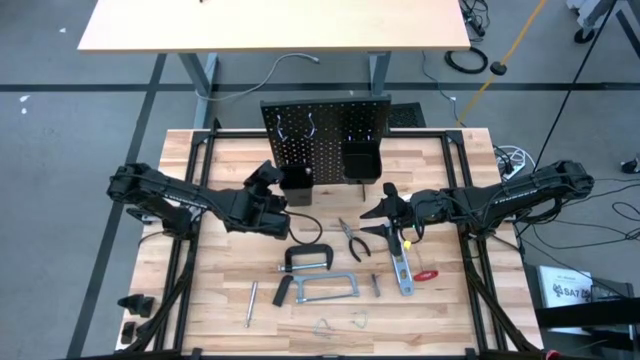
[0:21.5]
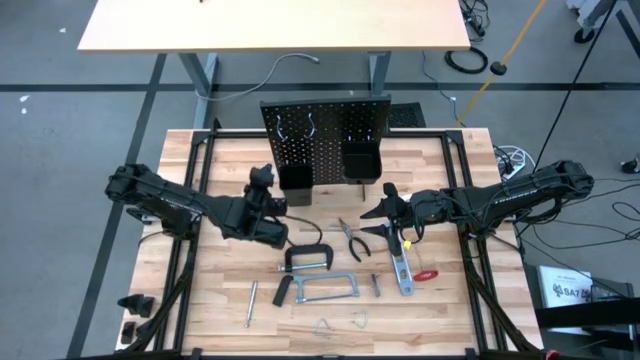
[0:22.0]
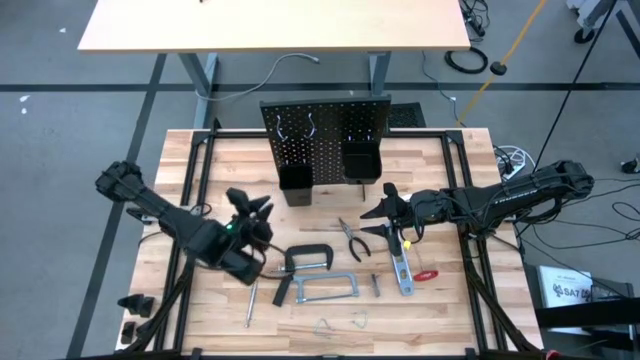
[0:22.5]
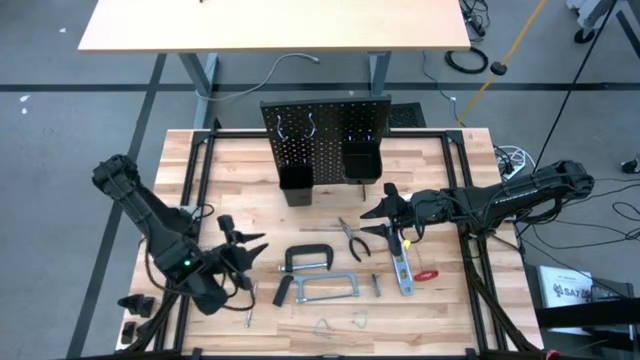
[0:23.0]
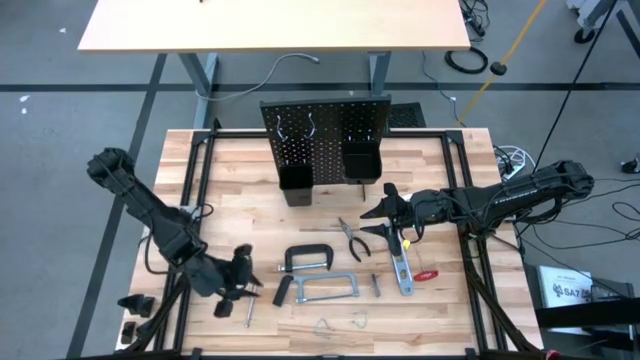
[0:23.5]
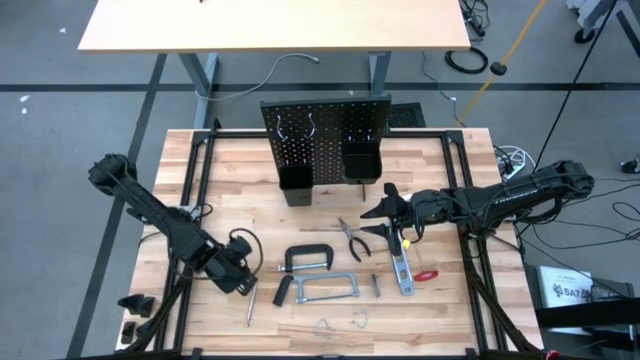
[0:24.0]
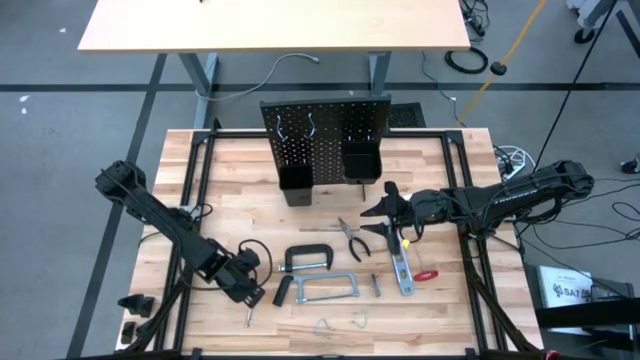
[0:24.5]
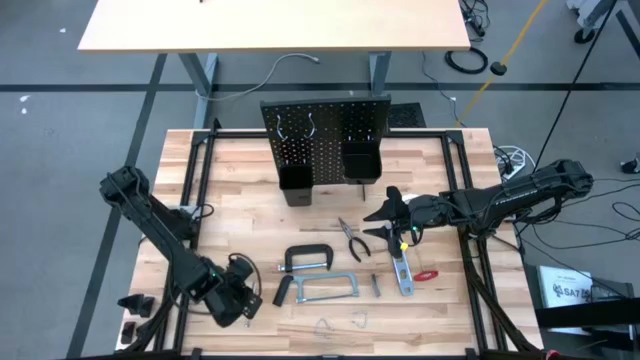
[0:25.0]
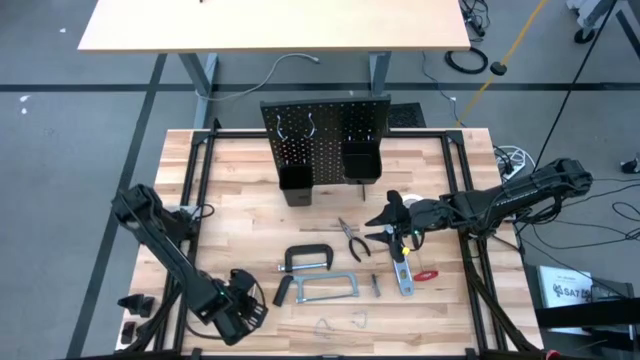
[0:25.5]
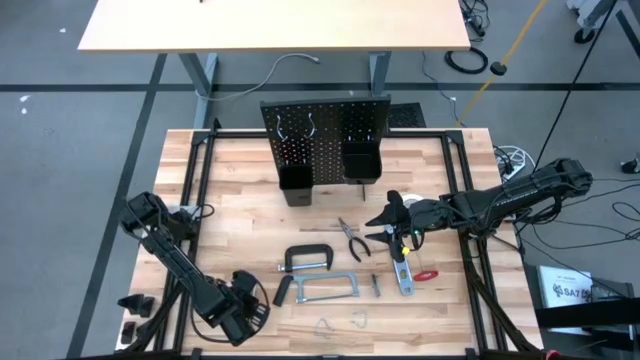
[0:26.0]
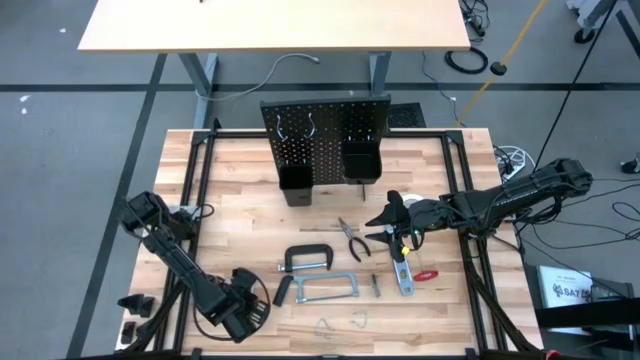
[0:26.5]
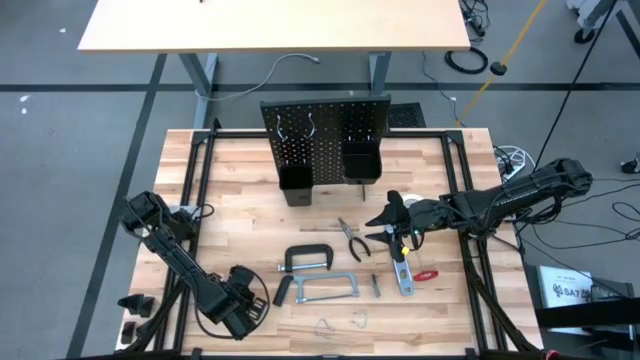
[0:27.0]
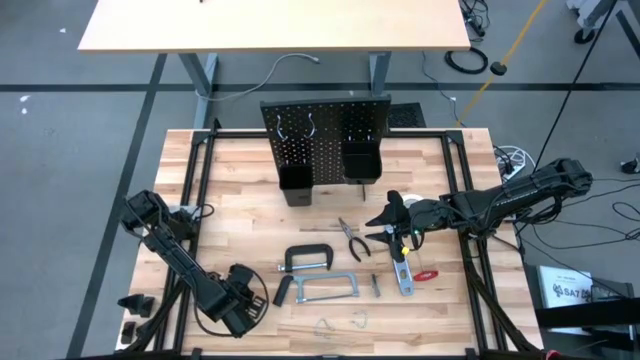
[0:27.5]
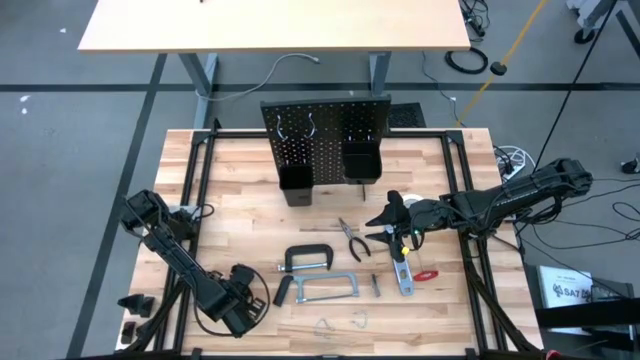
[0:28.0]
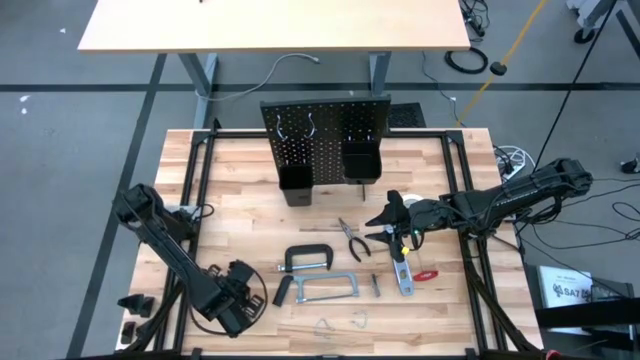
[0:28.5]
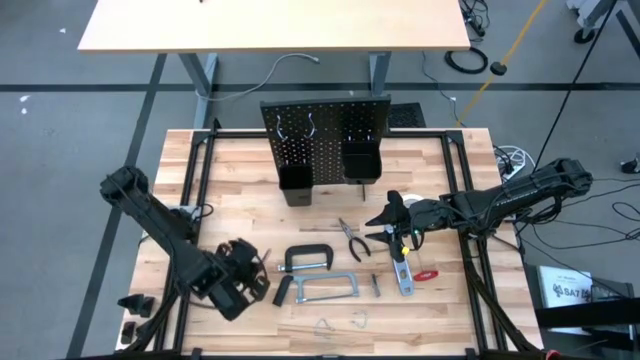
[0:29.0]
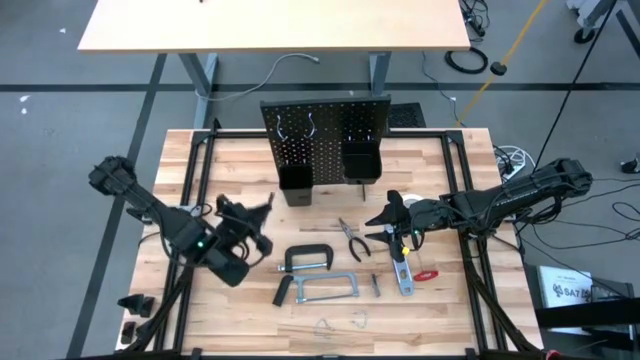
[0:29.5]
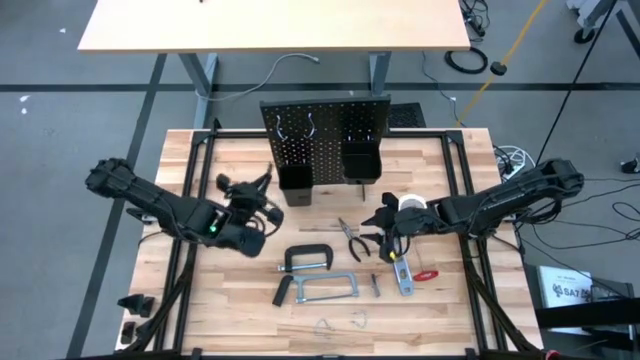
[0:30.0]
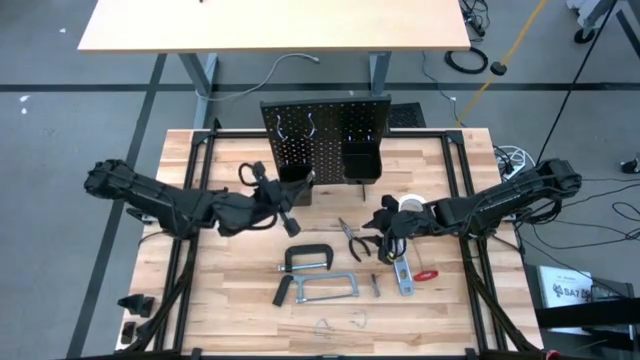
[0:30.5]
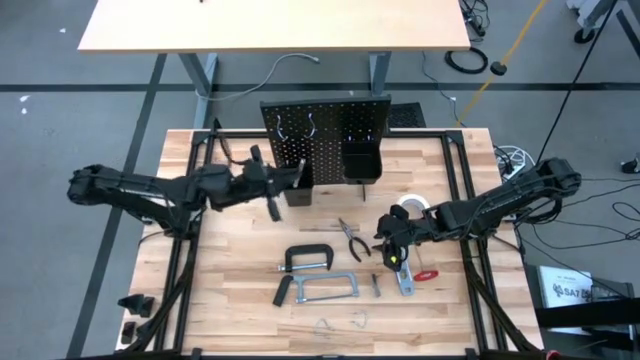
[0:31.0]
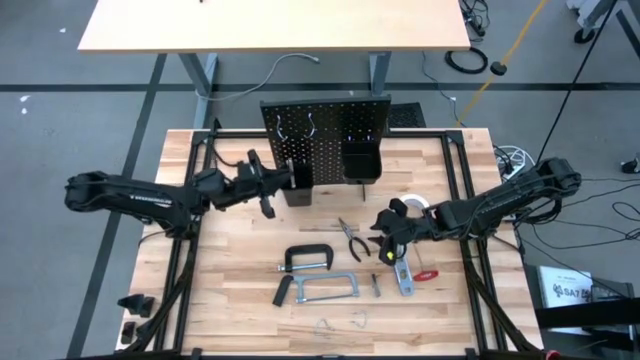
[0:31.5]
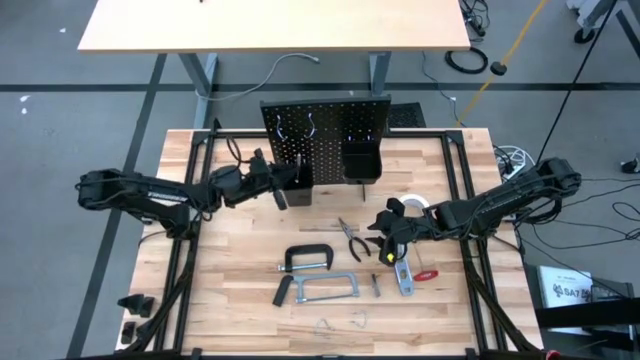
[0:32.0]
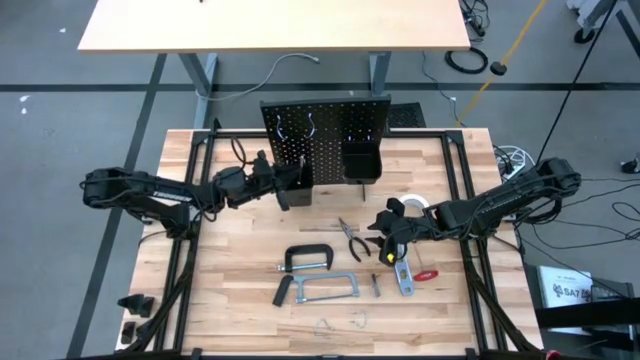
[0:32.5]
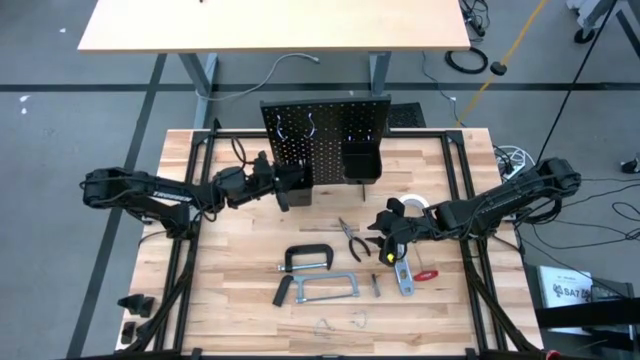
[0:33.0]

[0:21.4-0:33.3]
Task: Hang tools onto peg board
Put the silver pen into the bottom black bin on the peg board

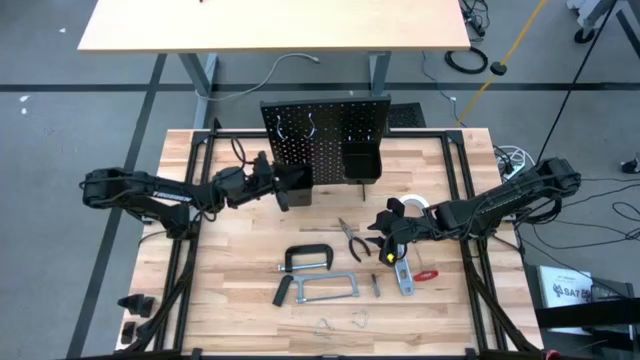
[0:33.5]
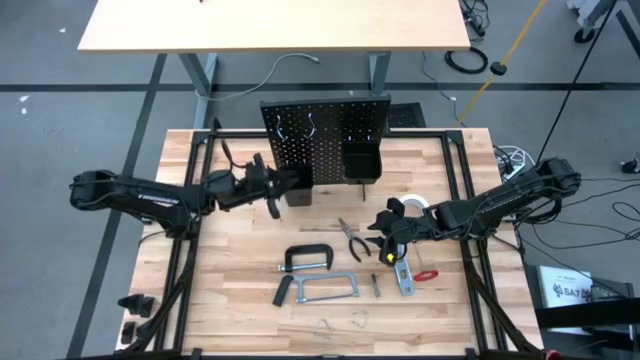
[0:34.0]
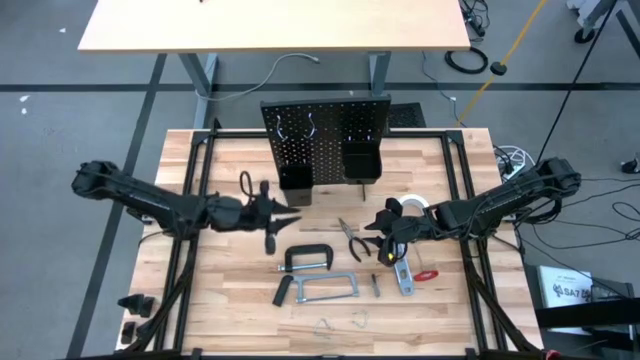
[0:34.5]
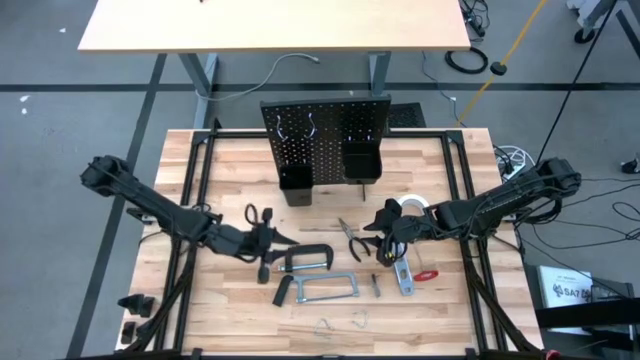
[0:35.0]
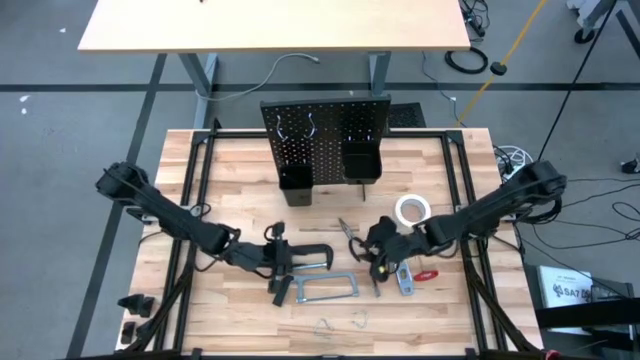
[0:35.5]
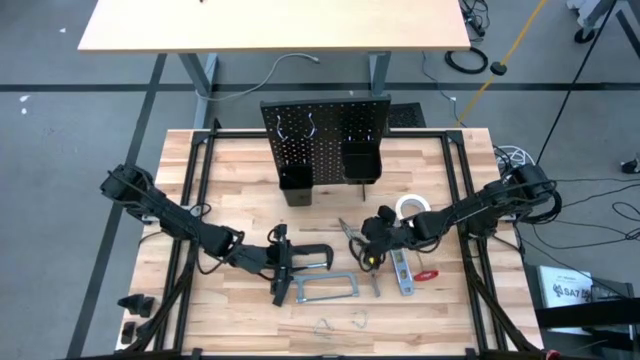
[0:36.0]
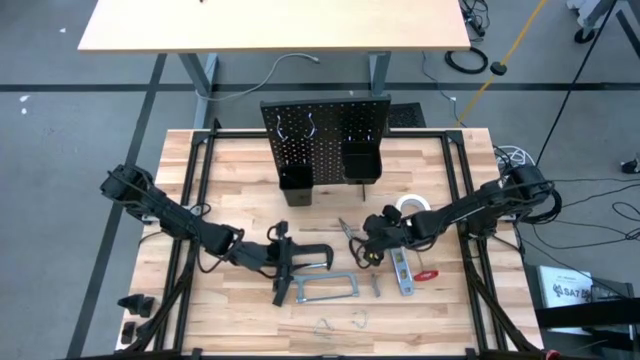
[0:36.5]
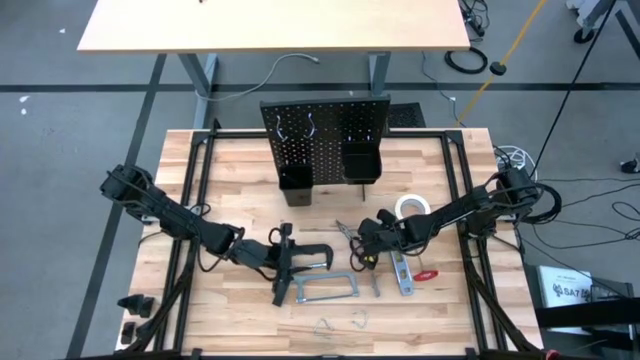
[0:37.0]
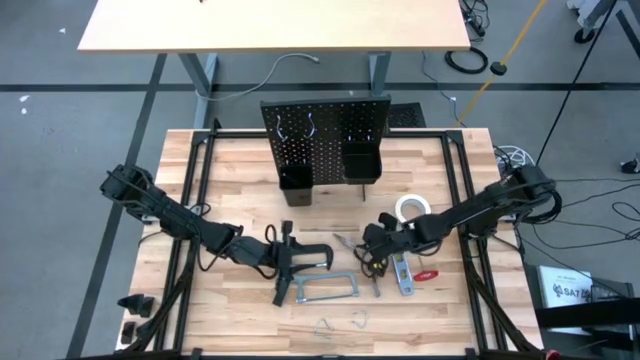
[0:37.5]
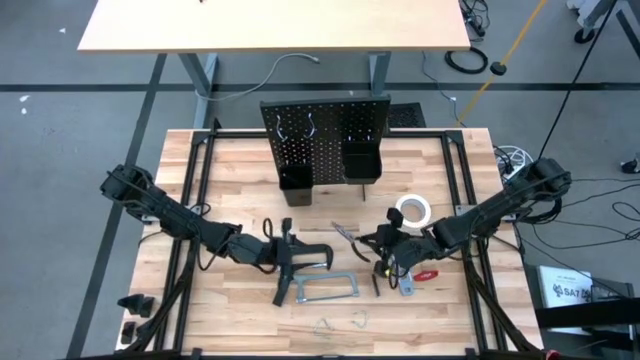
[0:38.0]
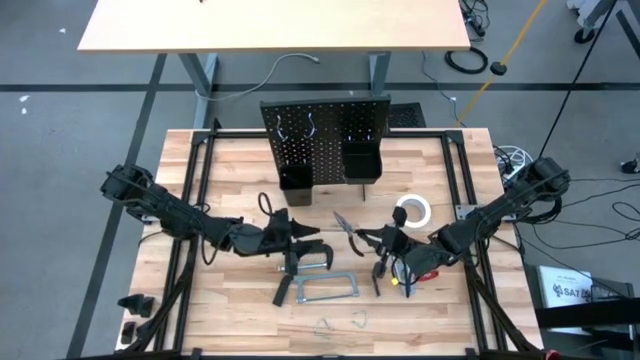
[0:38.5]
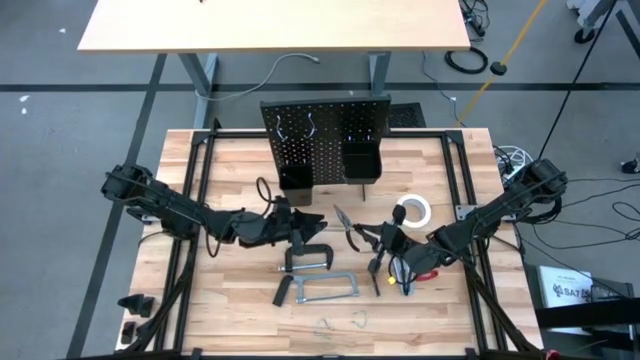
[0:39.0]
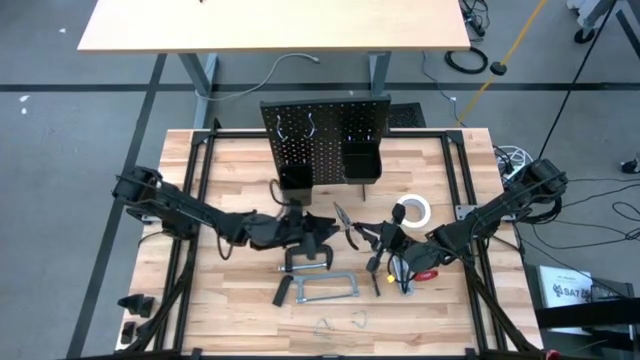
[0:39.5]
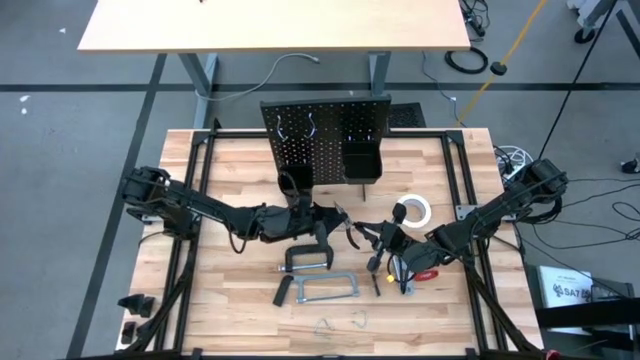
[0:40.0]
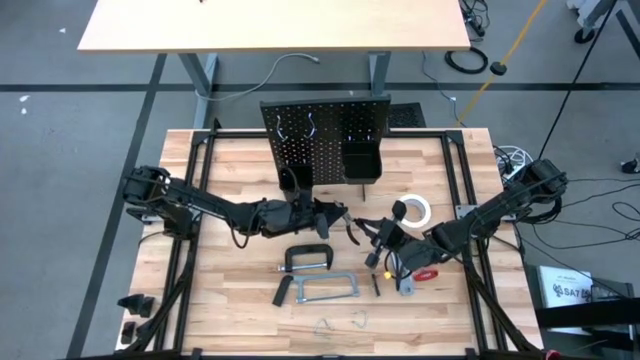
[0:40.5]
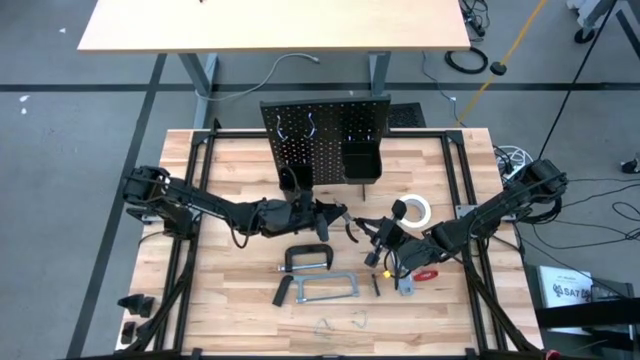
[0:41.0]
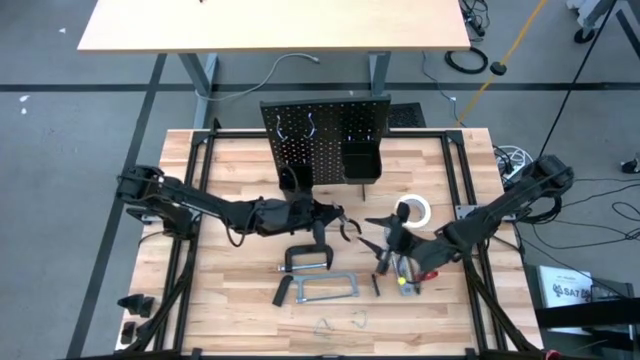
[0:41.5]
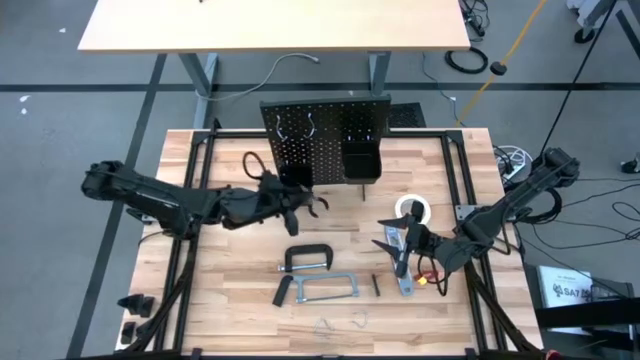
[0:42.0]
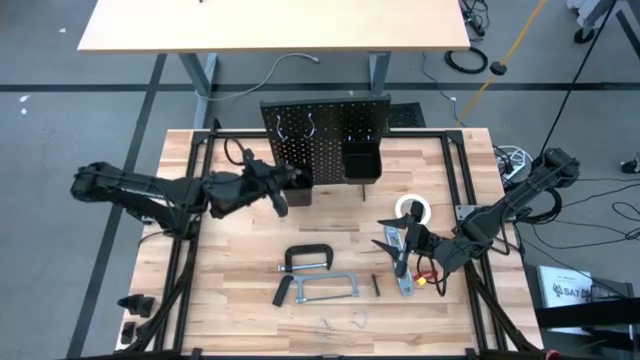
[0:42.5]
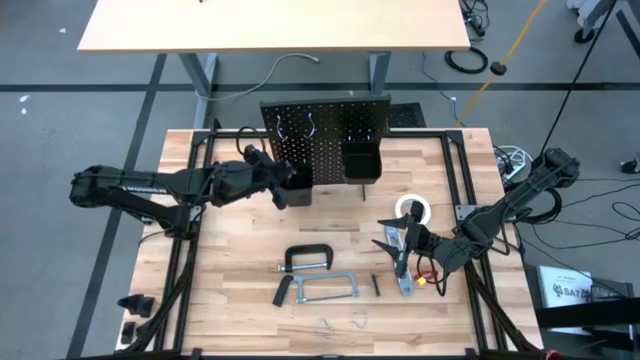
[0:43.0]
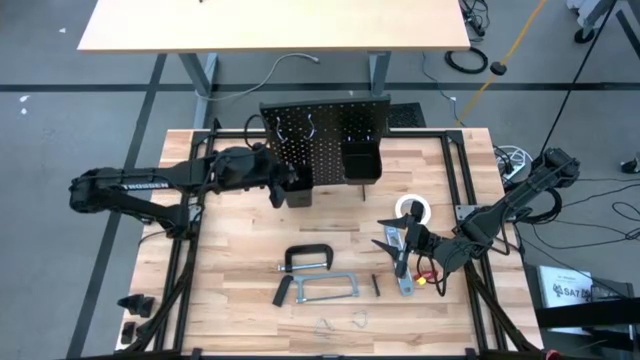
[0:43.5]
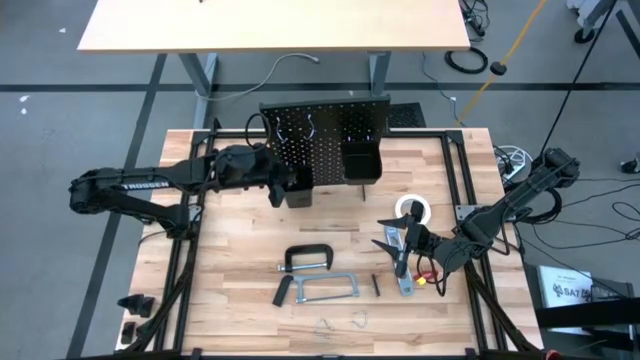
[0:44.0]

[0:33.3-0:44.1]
Put the black pliers into the bottom black bin on the peg board
